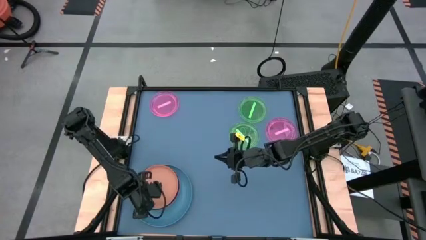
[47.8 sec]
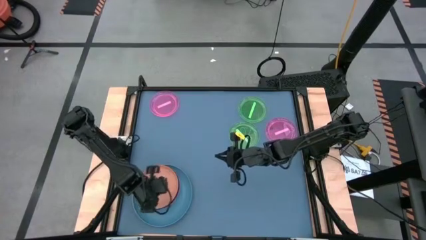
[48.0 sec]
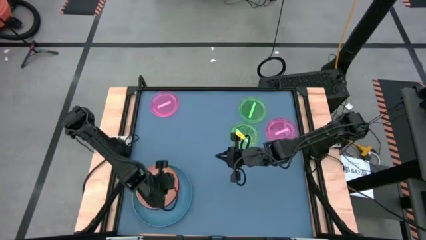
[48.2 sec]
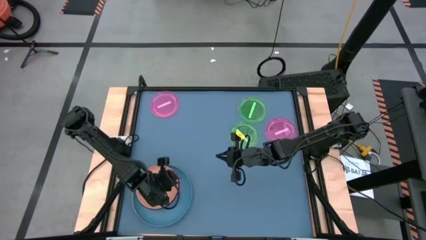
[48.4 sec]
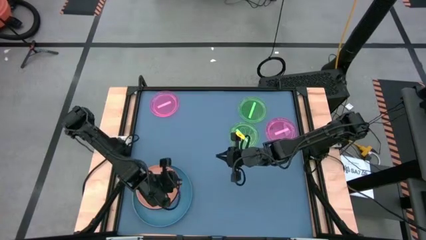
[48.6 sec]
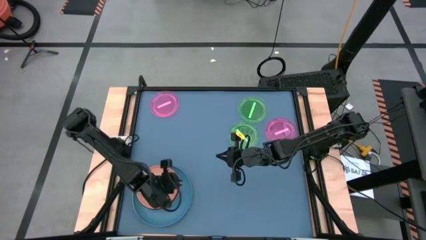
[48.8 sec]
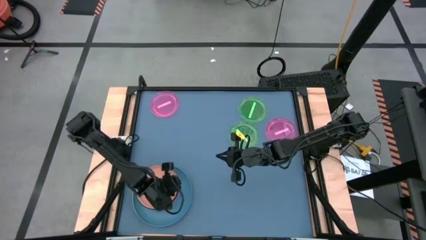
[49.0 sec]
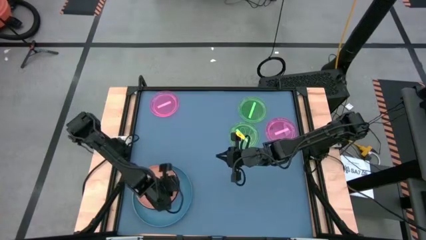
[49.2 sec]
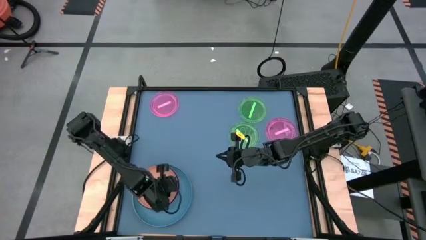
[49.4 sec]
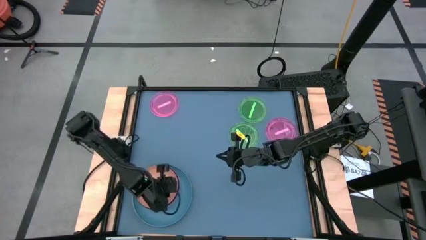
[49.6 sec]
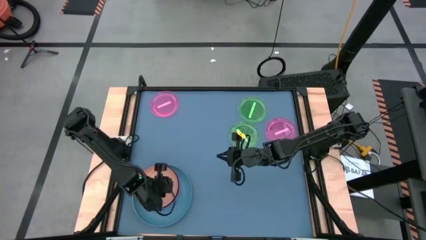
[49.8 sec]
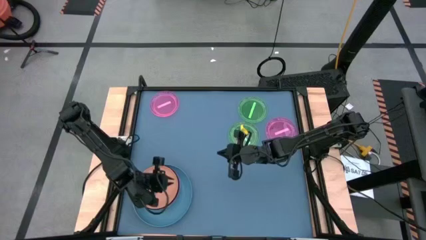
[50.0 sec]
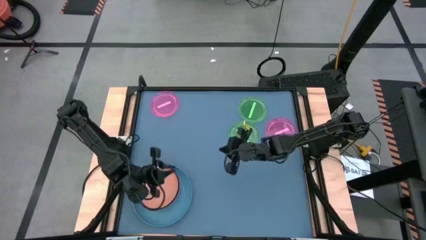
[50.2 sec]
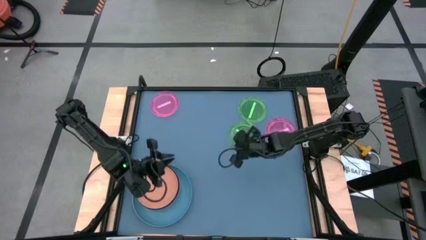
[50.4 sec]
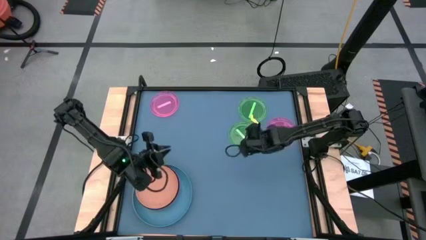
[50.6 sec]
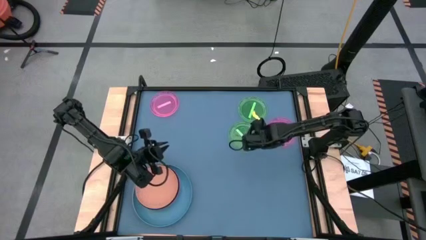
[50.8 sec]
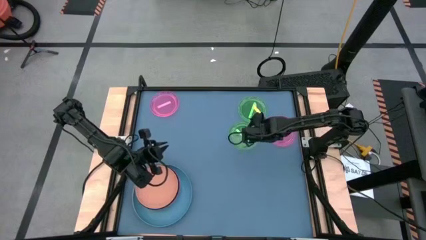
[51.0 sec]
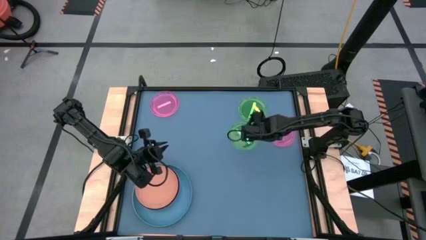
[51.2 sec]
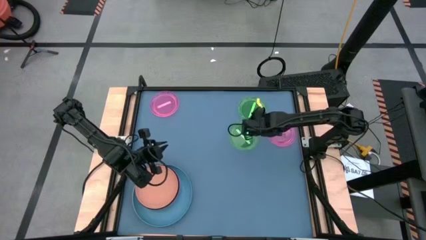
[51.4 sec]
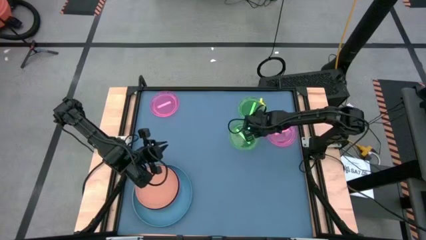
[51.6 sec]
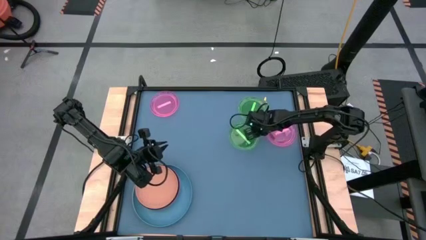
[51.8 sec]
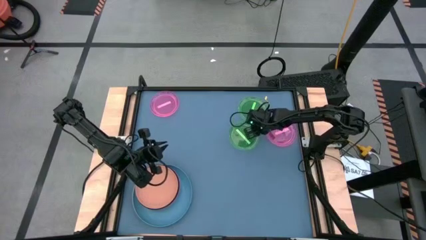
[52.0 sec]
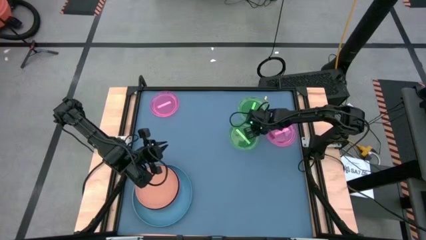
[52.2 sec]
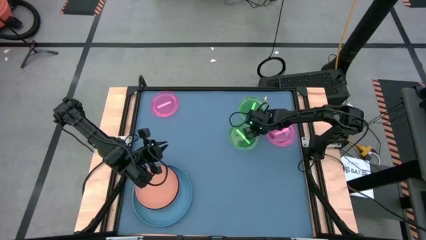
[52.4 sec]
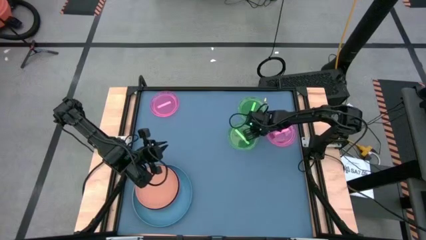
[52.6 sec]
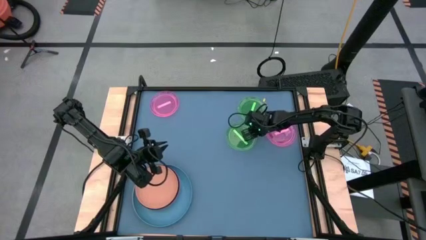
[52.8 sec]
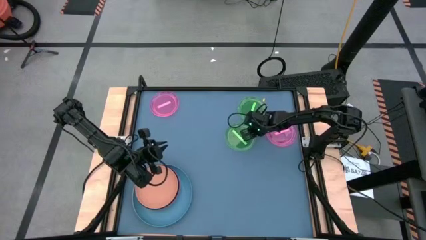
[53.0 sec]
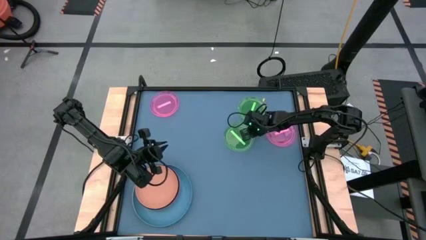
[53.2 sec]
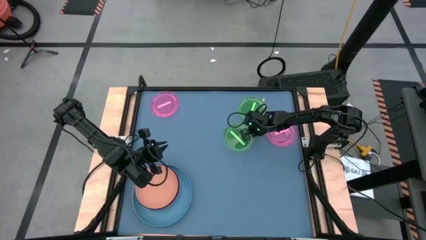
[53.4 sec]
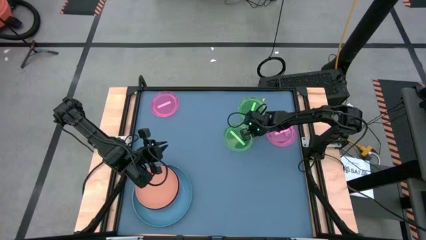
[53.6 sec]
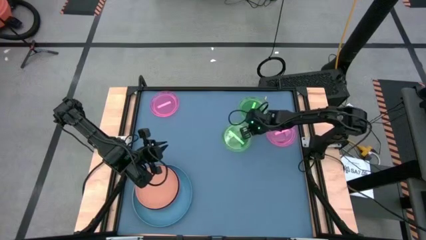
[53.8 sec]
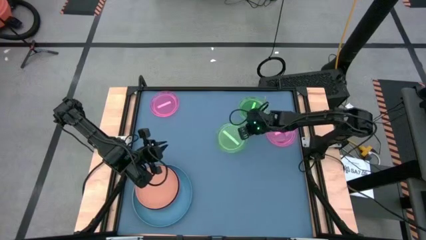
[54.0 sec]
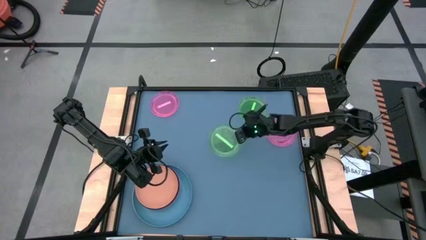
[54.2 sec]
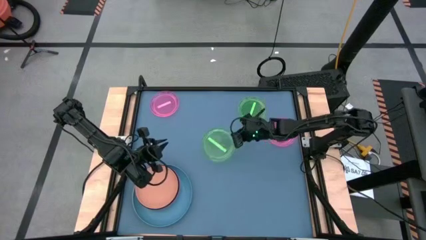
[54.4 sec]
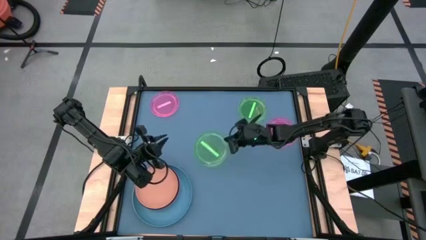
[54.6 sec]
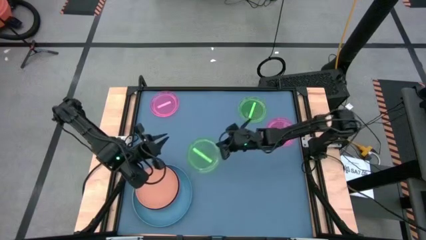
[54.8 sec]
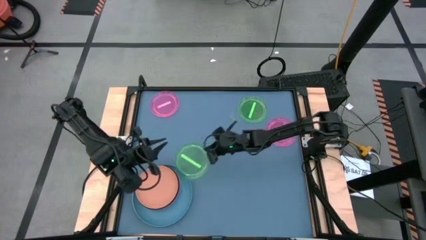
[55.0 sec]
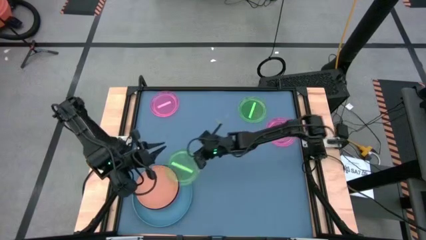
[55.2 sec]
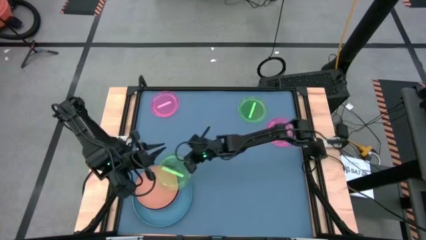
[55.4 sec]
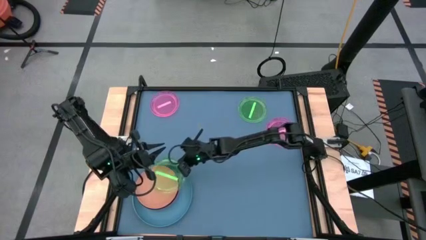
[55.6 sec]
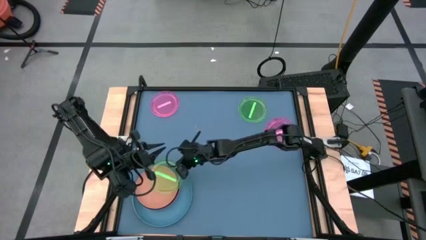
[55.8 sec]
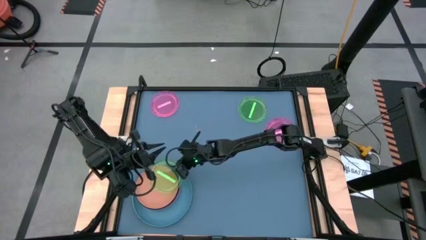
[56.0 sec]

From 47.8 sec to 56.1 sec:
Task: Stack plastic plates
Stack the bottom green plate on top of the orange plate

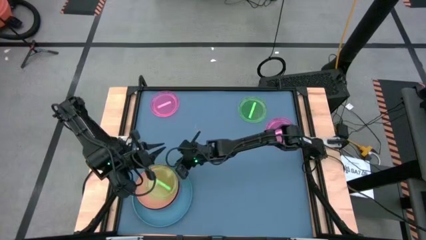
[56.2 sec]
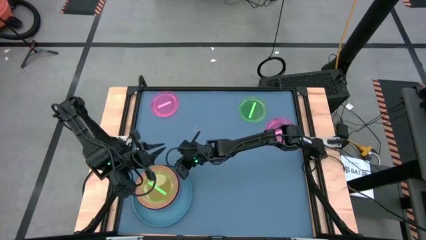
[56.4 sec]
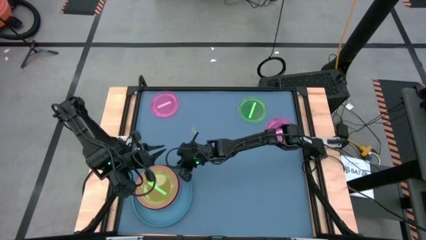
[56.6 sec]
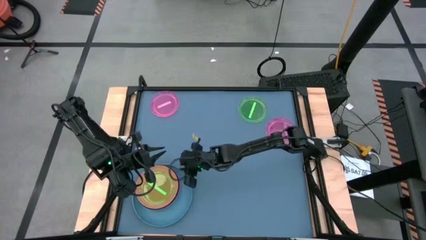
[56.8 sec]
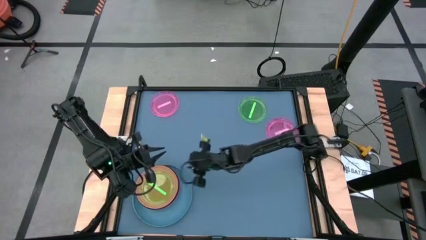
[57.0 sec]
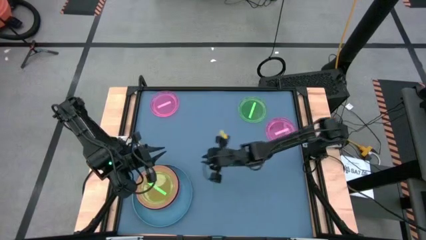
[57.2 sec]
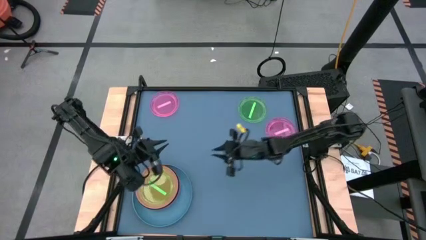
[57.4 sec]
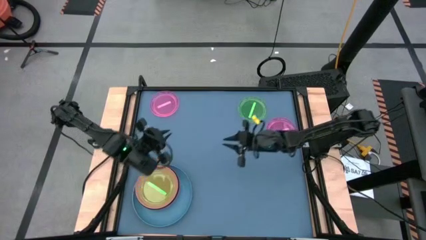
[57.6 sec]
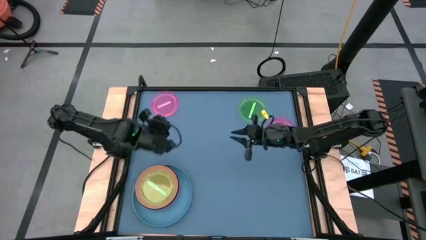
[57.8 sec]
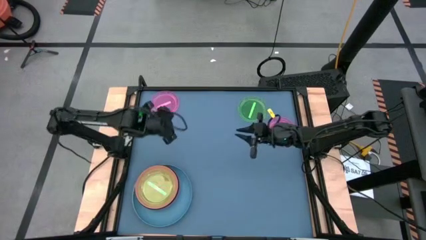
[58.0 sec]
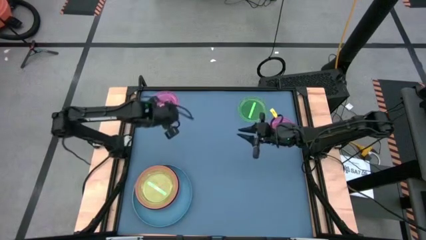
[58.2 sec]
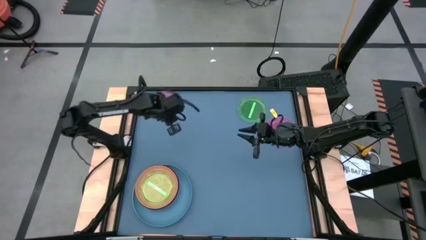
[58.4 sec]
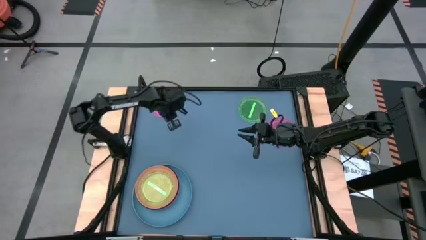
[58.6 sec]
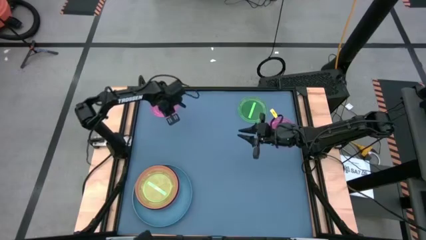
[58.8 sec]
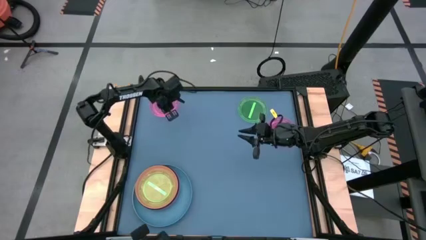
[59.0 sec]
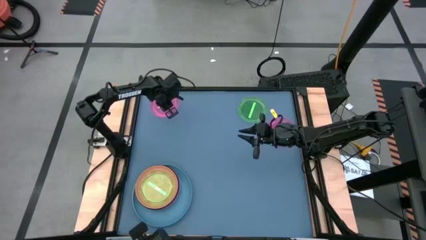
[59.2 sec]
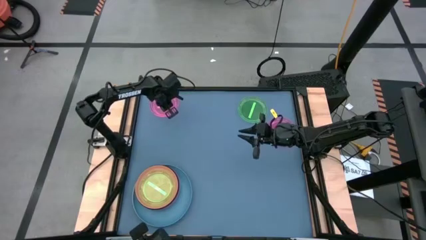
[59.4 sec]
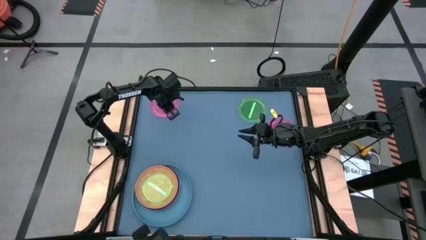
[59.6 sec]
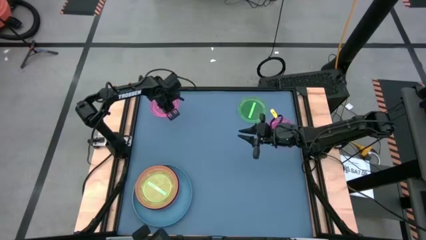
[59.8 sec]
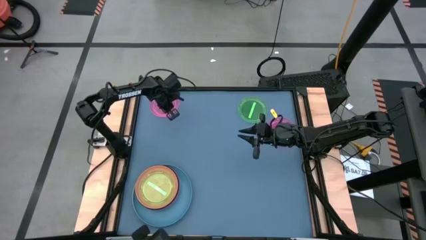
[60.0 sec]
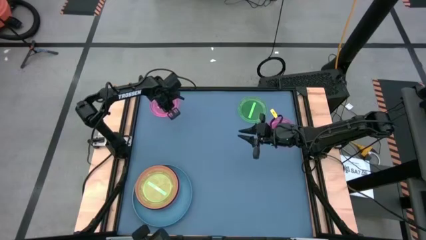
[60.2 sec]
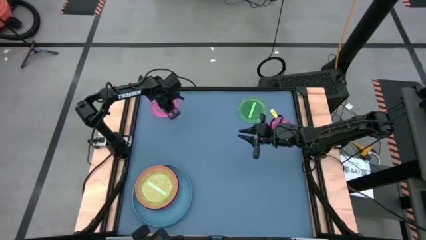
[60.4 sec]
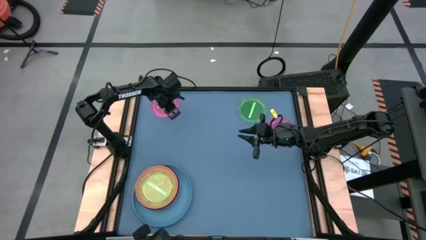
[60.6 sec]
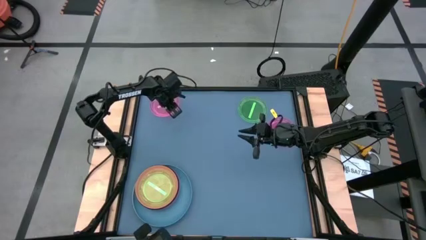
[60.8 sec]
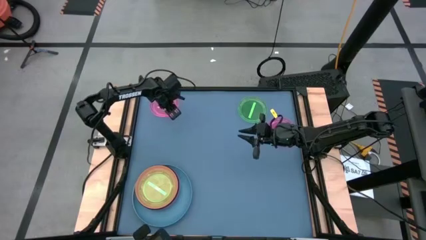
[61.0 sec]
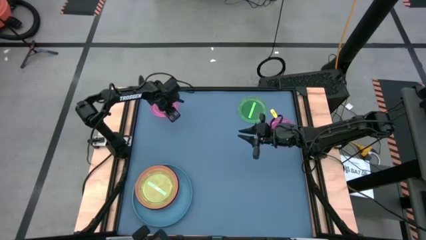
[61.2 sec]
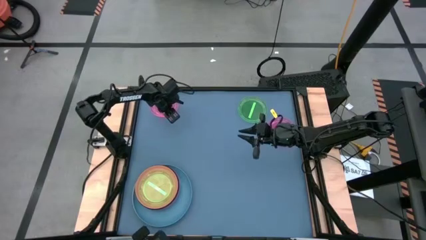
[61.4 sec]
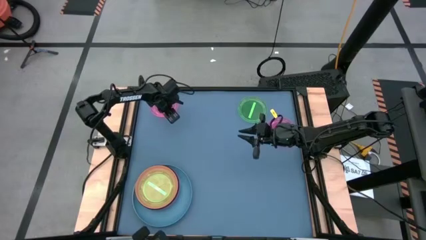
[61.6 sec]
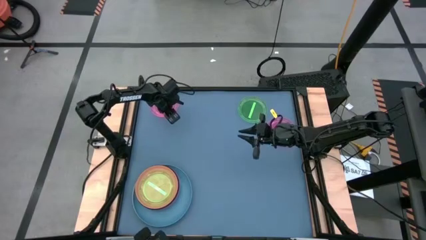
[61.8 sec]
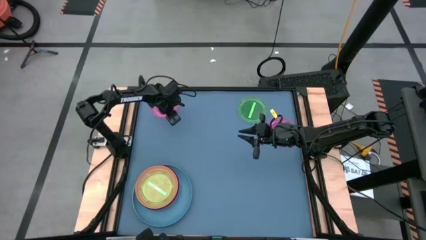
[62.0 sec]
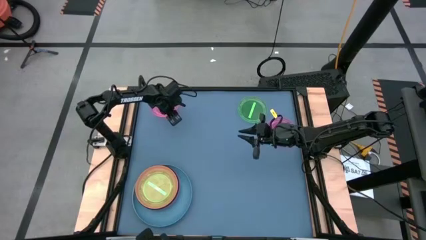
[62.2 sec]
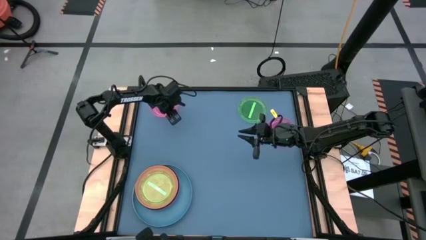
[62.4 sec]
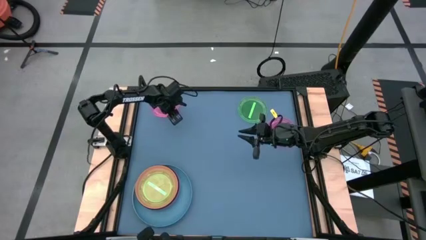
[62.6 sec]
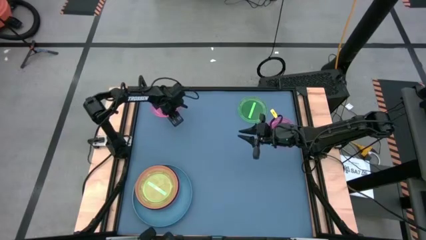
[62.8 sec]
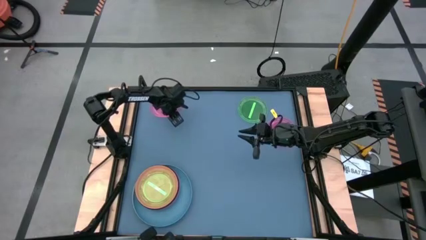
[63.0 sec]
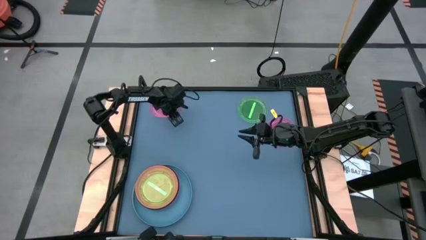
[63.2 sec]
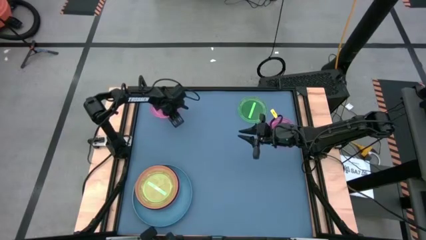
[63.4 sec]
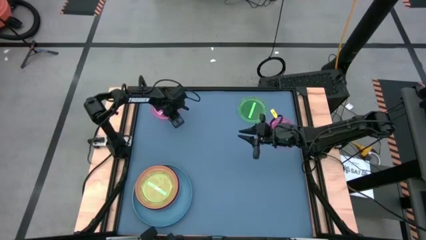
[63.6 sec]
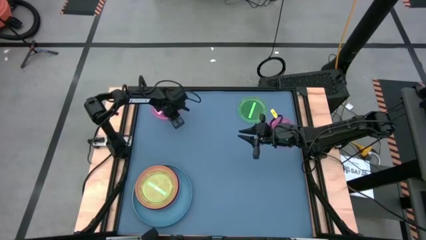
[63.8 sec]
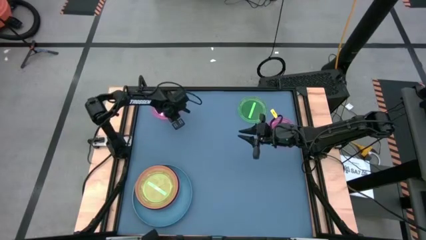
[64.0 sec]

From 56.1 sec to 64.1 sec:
Stack the left pink plate on top of the green plate
